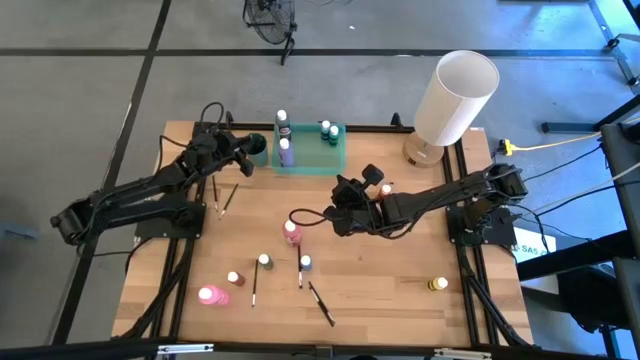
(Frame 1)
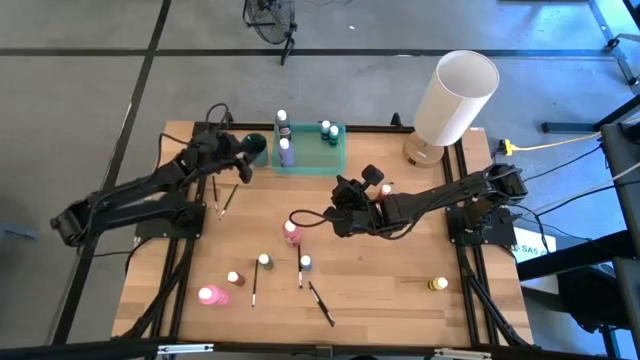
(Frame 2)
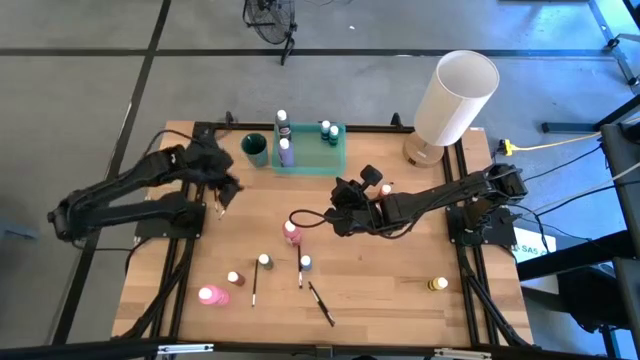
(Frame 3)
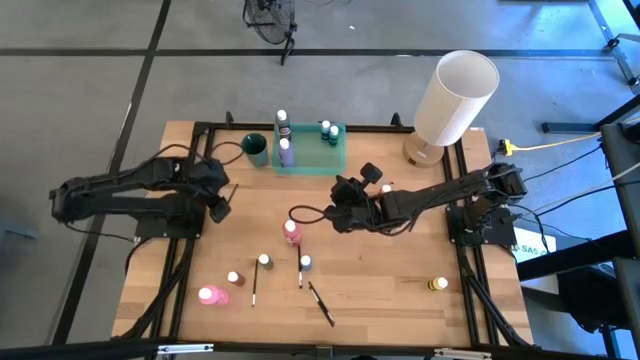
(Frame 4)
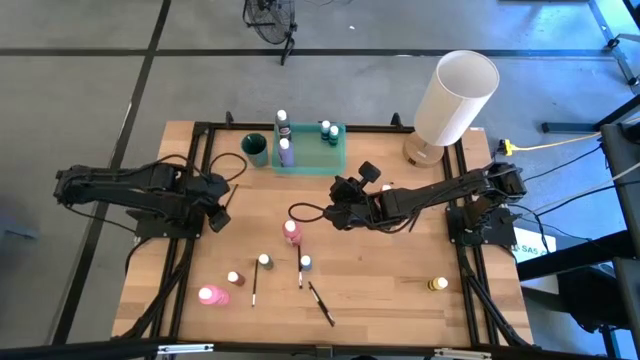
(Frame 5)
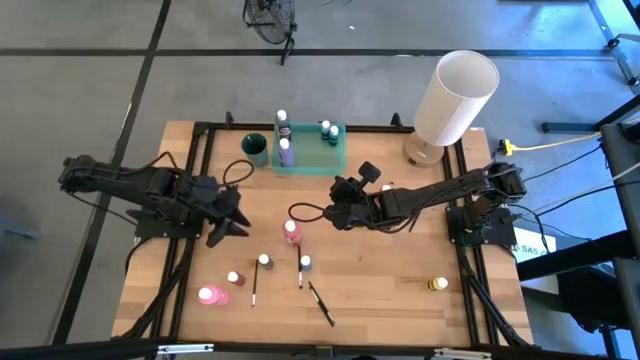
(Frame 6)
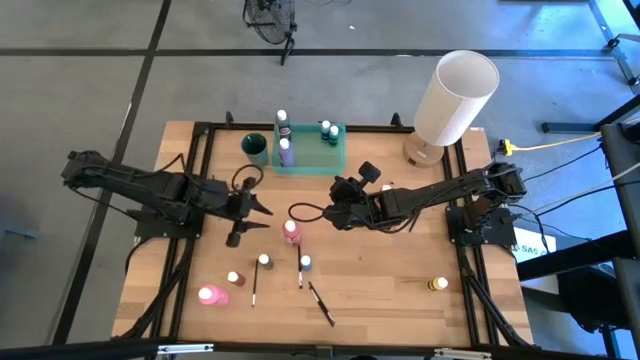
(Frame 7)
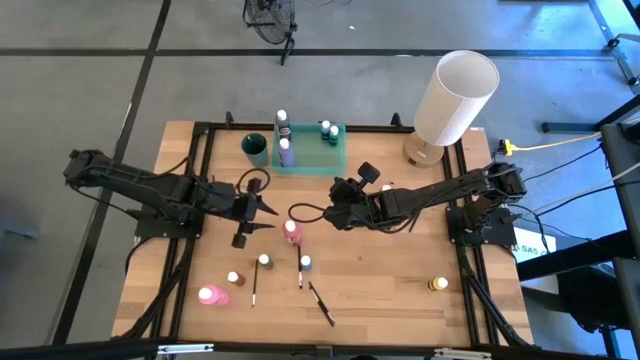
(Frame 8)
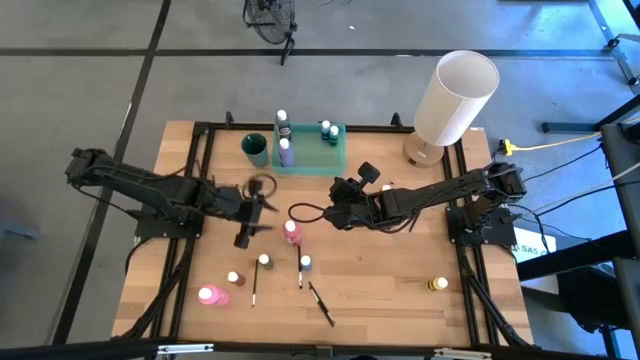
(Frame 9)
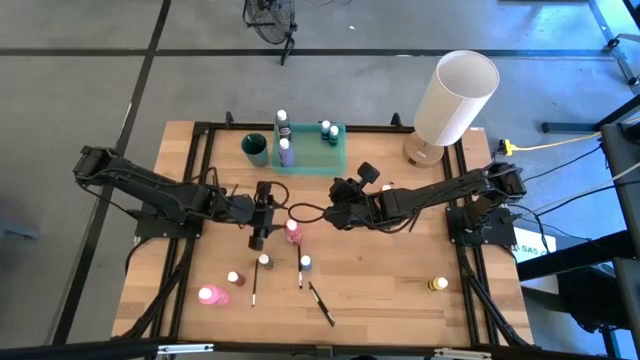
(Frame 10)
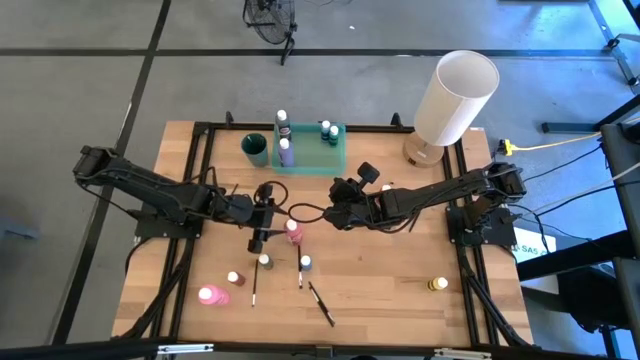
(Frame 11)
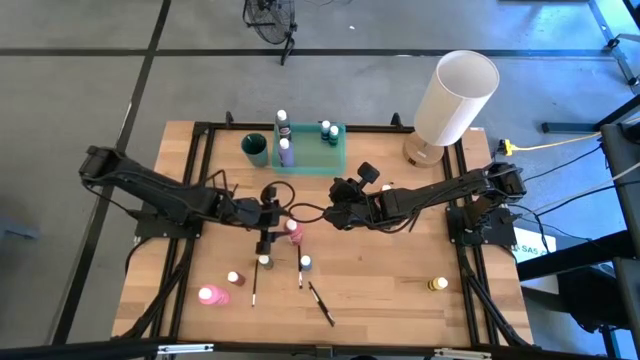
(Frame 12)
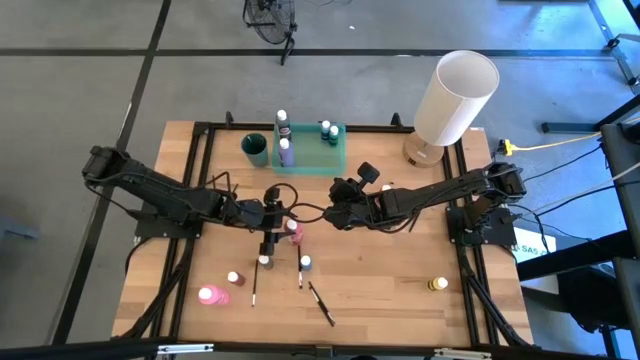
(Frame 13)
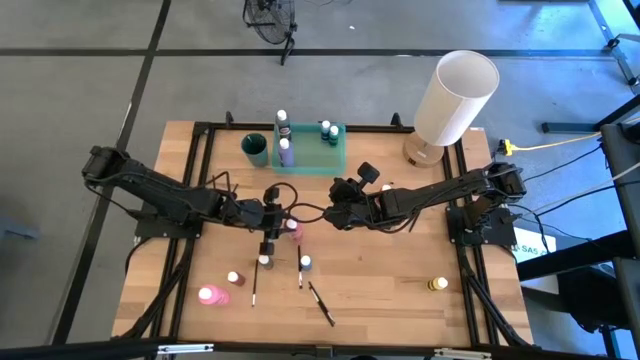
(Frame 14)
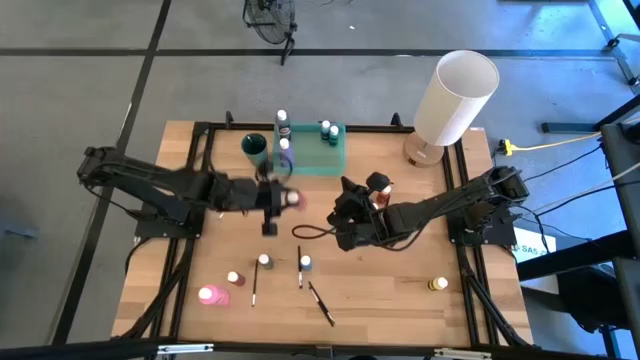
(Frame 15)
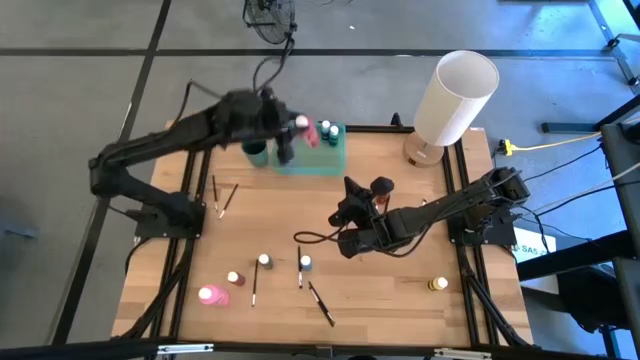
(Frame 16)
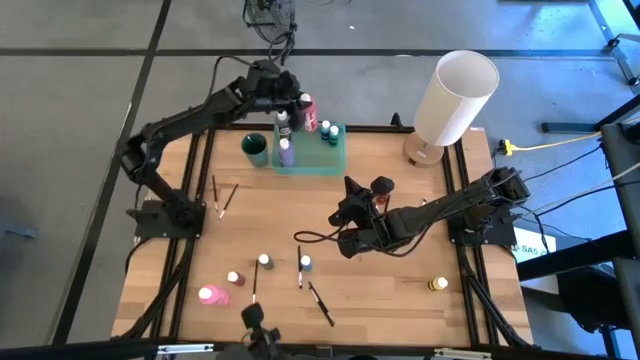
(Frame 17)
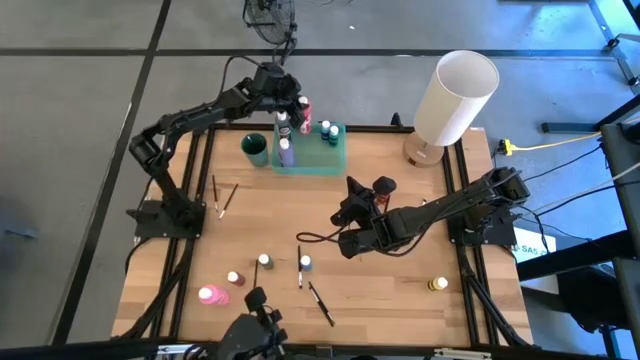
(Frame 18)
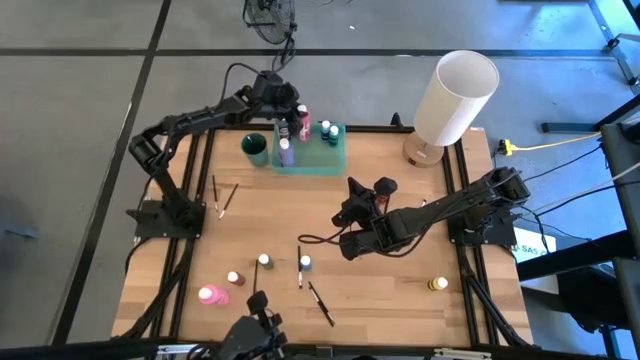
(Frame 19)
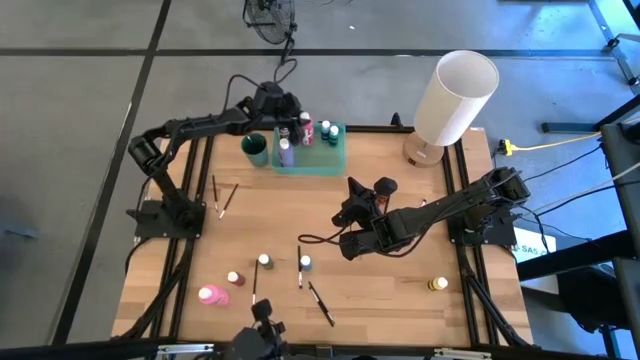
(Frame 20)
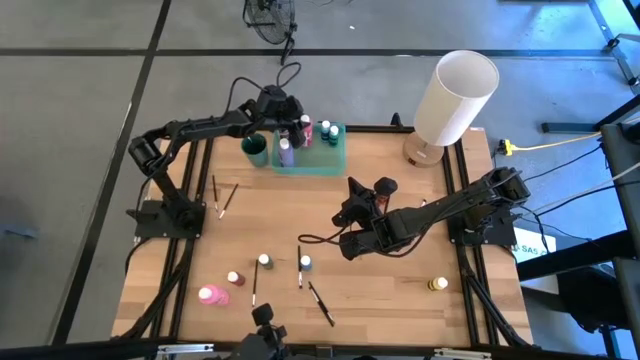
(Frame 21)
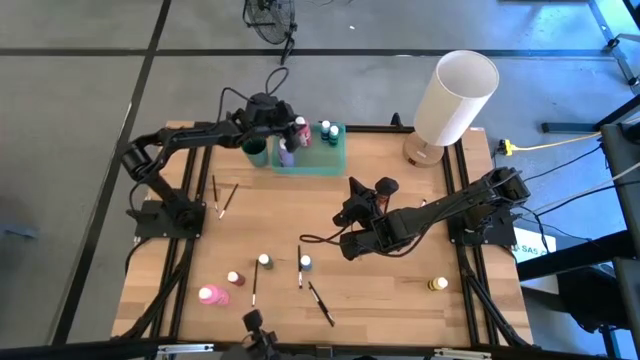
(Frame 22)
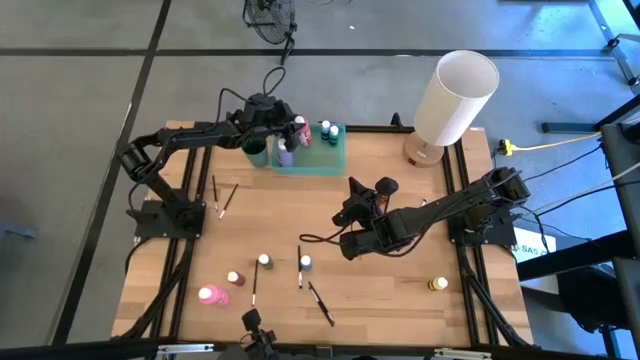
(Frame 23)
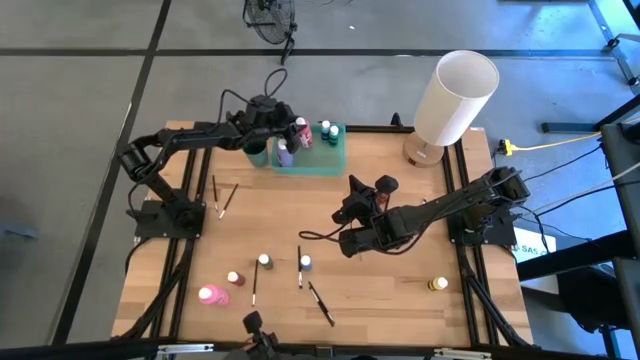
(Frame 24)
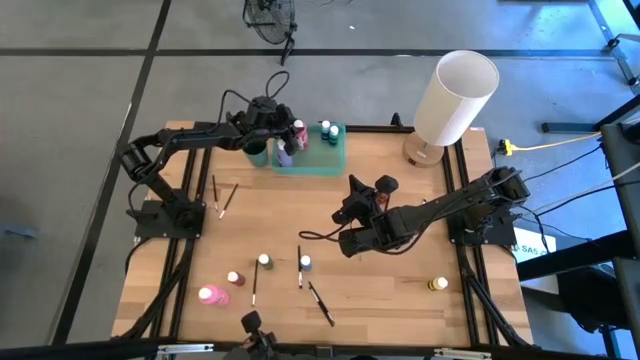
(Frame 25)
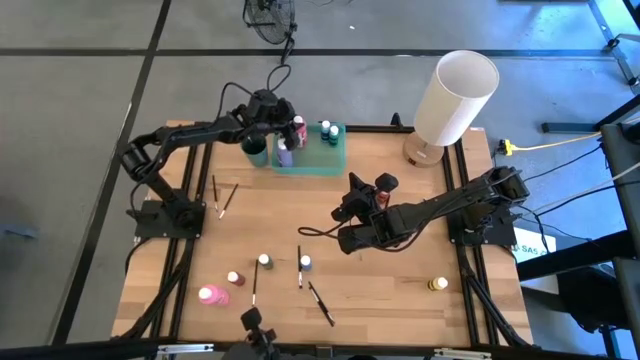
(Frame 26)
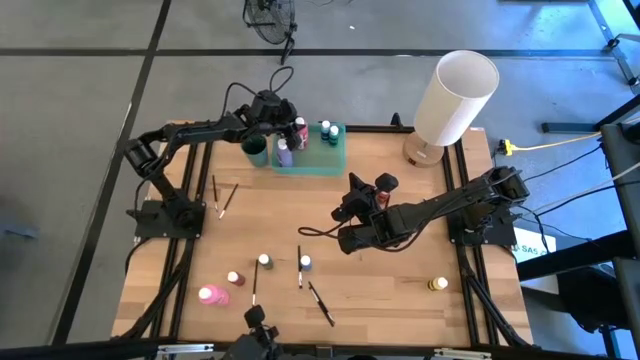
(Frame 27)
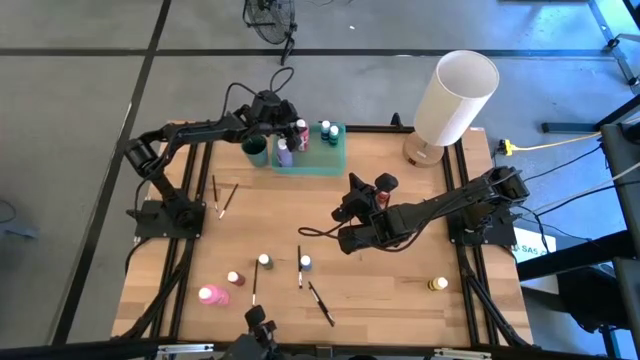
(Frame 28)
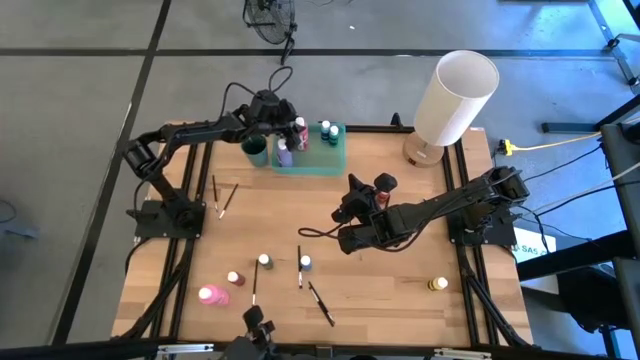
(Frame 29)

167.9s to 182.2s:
Task: Pick & Place Paint Supplies
Put the top big pink paint bottle into the green bin

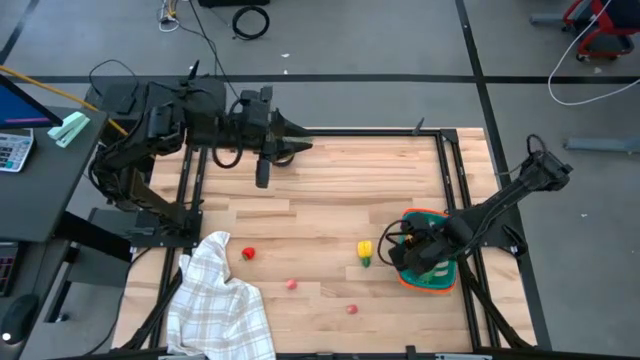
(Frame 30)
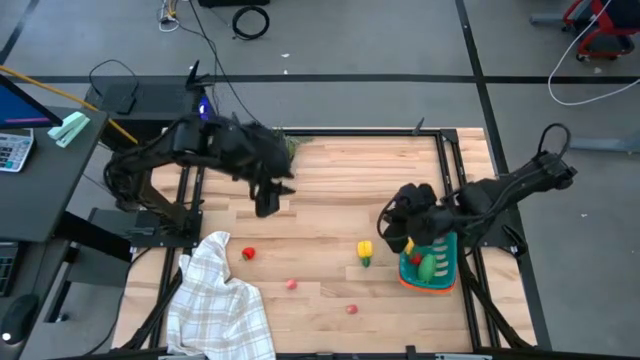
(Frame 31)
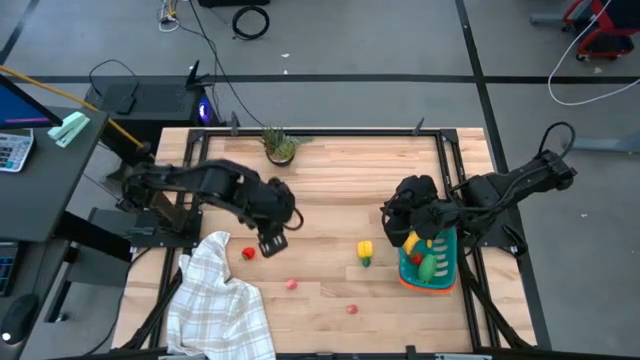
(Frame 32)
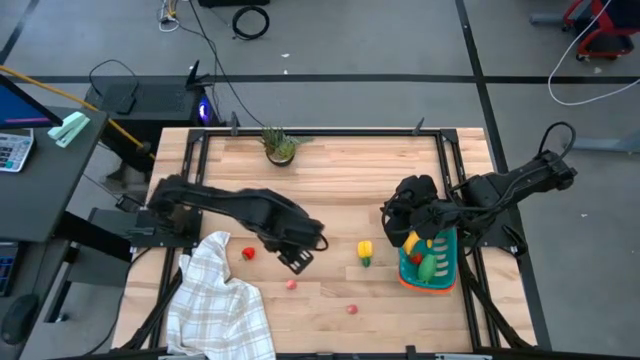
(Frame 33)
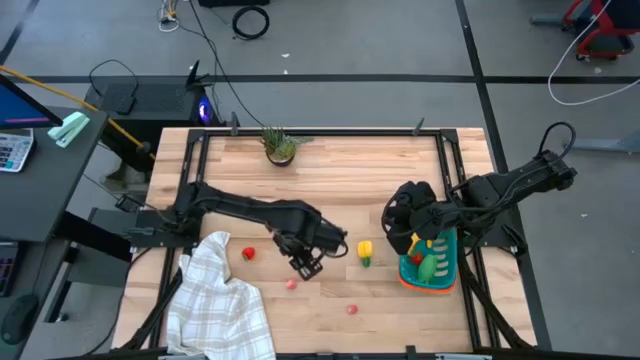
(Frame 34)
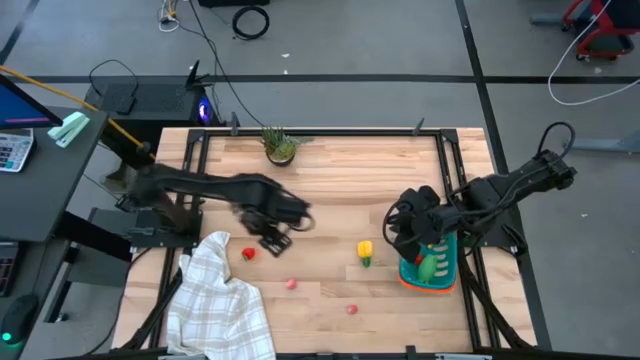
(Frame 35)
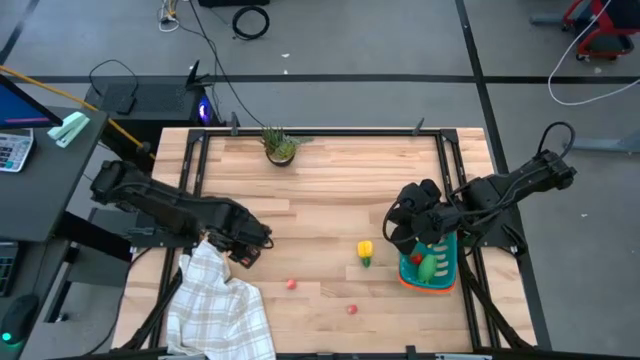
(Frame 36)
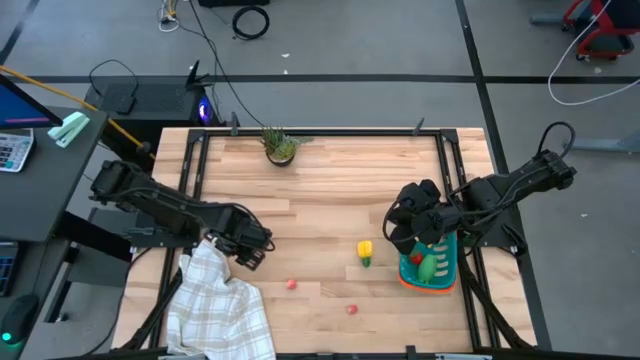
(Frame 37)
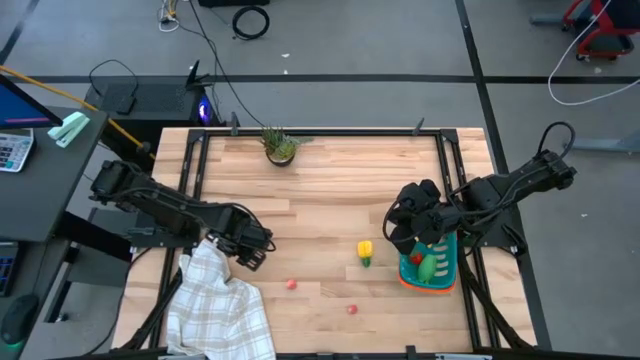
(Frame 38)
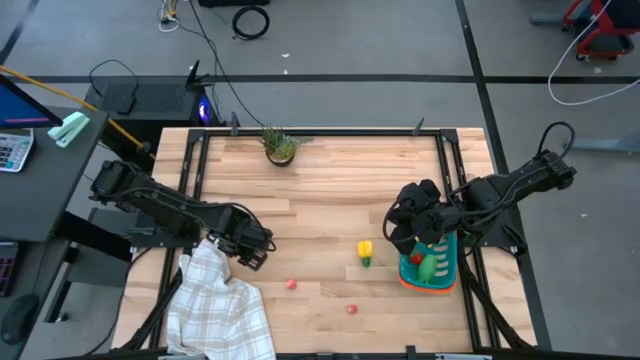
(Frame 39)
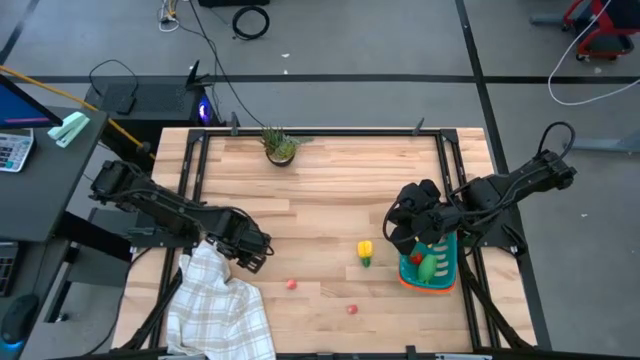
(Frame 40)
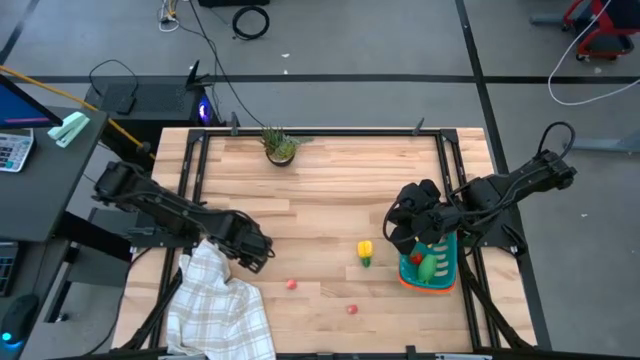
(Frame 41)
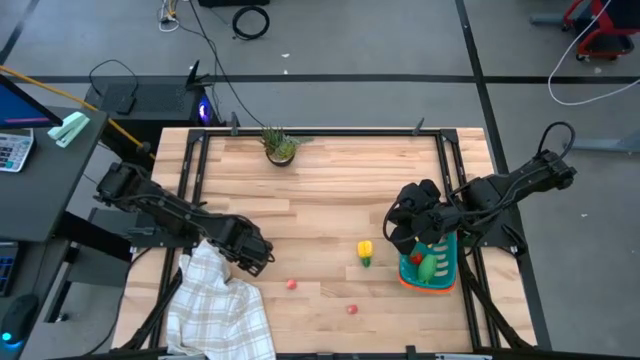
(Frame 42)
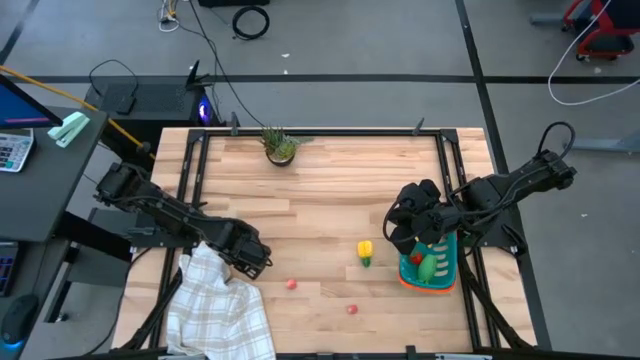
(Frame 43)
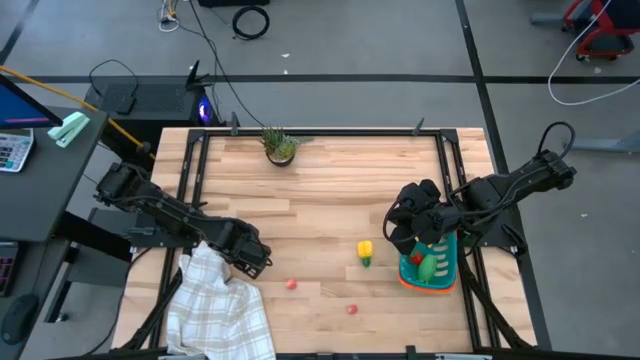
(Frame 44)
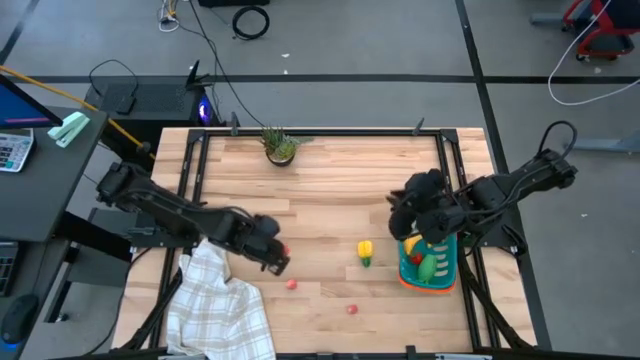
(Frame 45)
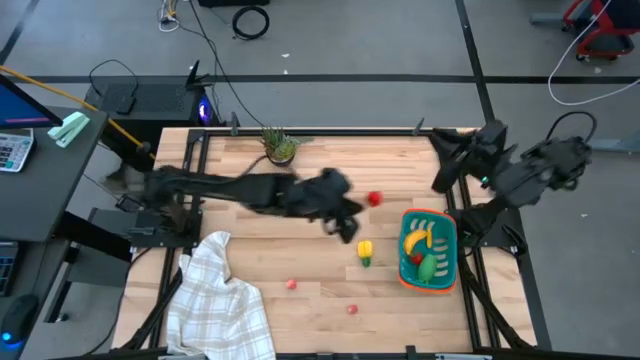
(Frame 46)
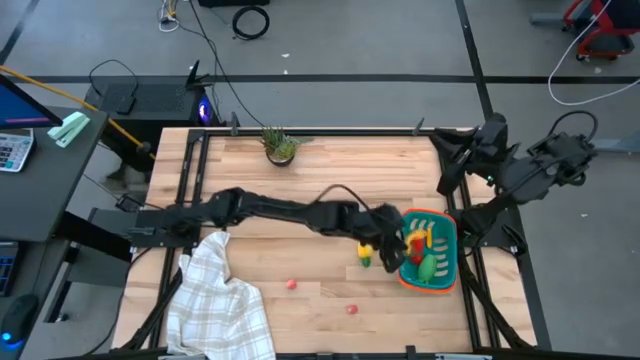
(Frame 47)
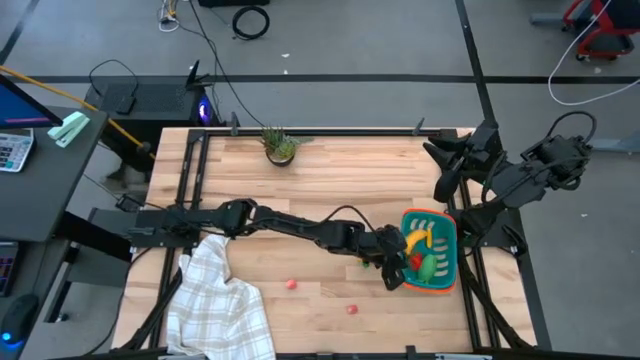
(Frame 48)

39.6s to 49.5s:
Task: Pick and placing Produce into tupperware
Put the red strawberry into the blue basket
